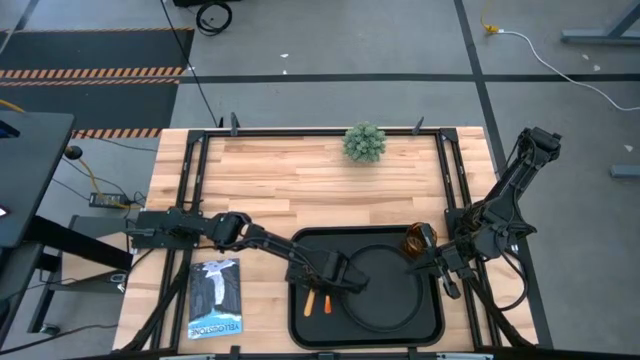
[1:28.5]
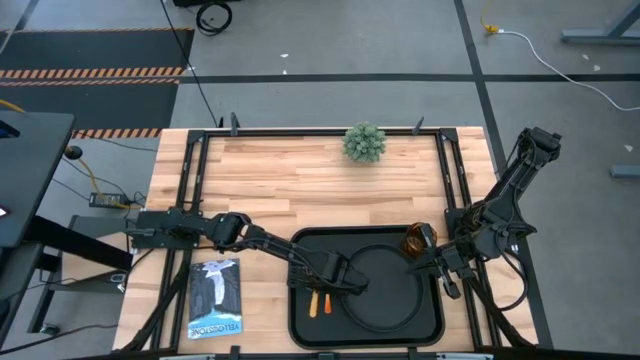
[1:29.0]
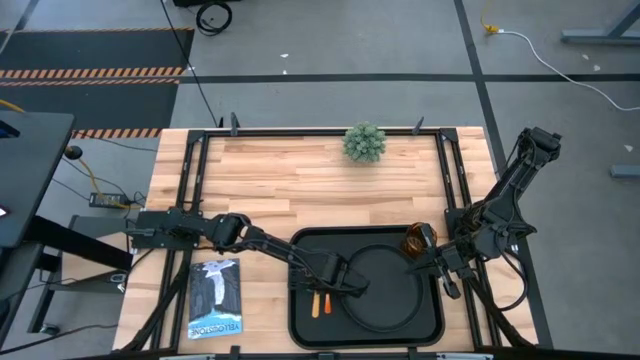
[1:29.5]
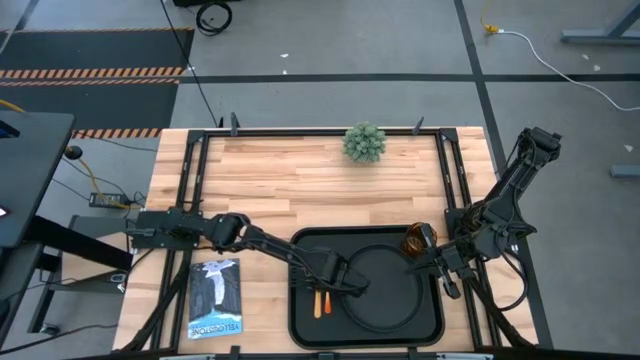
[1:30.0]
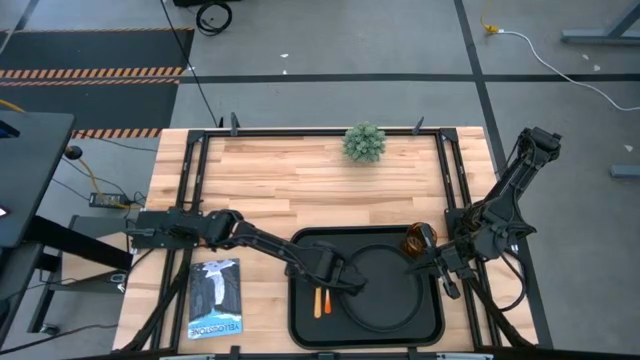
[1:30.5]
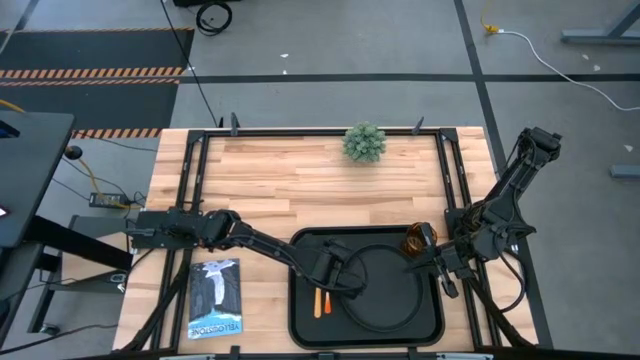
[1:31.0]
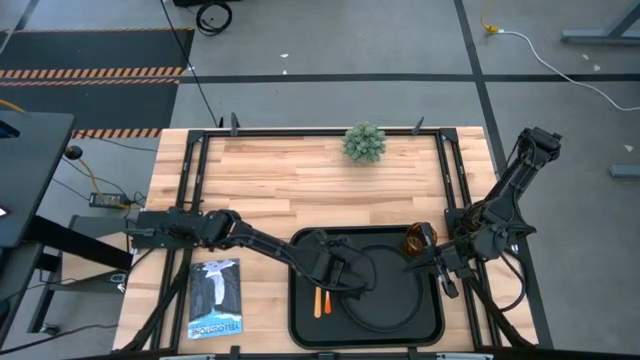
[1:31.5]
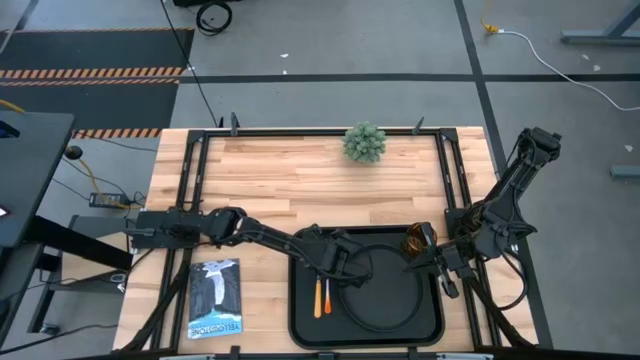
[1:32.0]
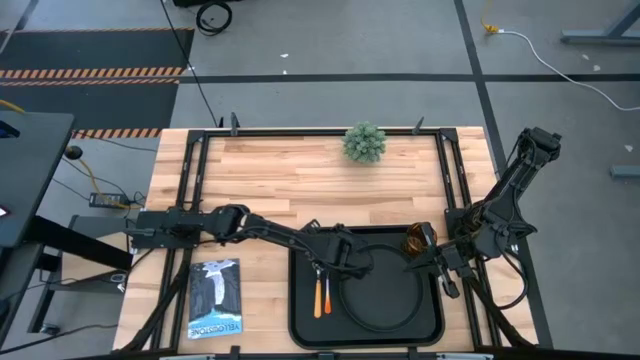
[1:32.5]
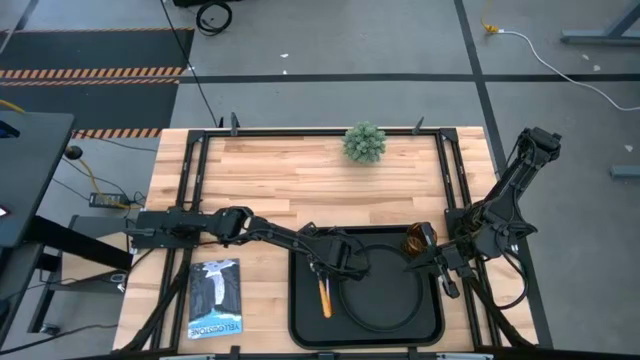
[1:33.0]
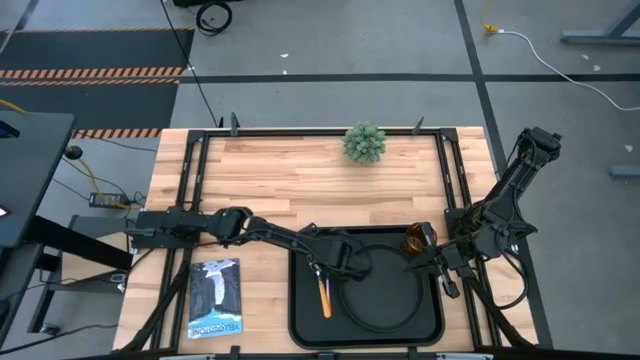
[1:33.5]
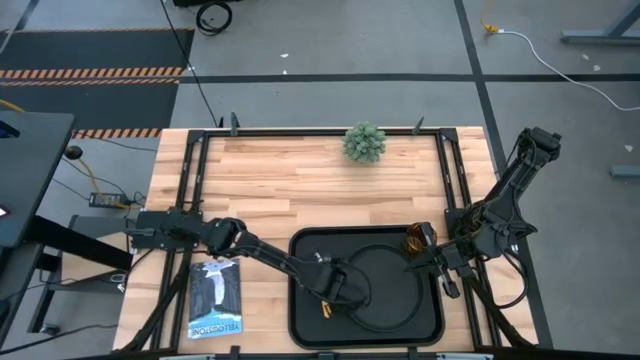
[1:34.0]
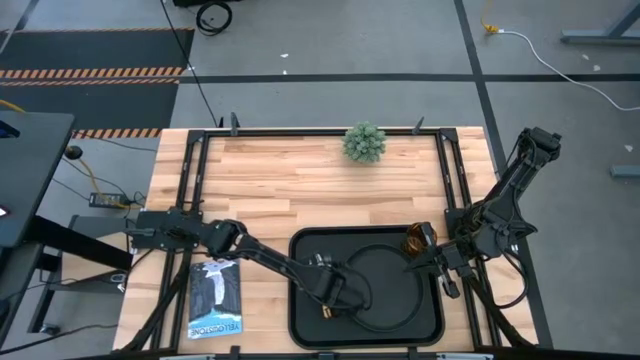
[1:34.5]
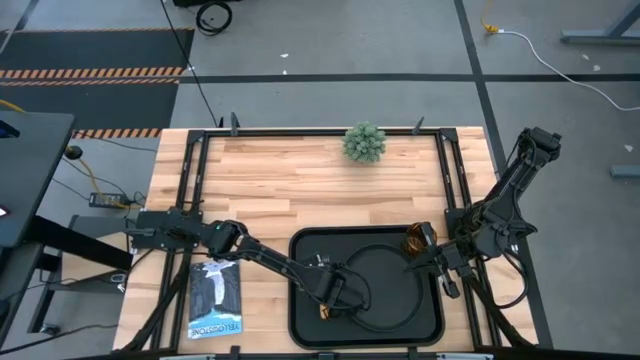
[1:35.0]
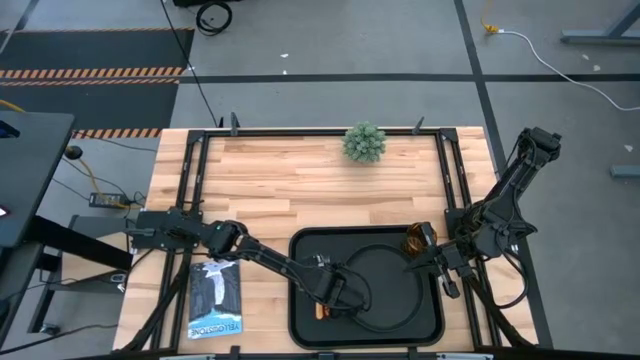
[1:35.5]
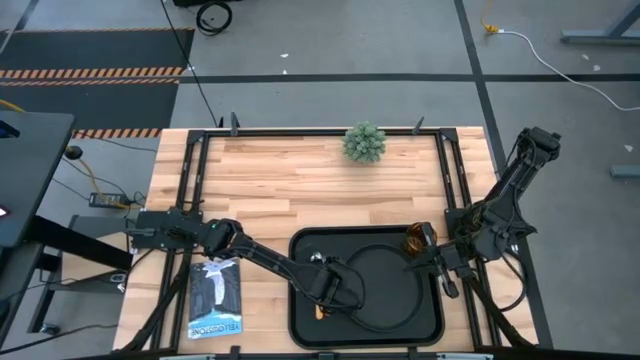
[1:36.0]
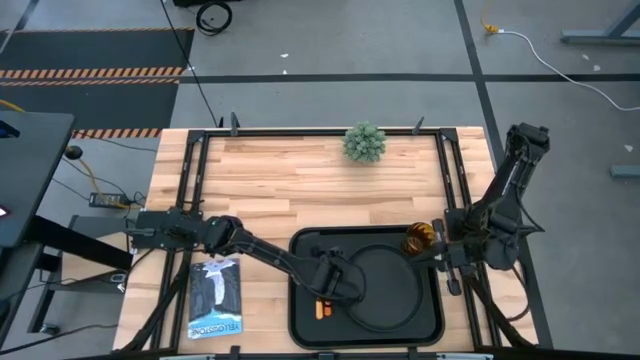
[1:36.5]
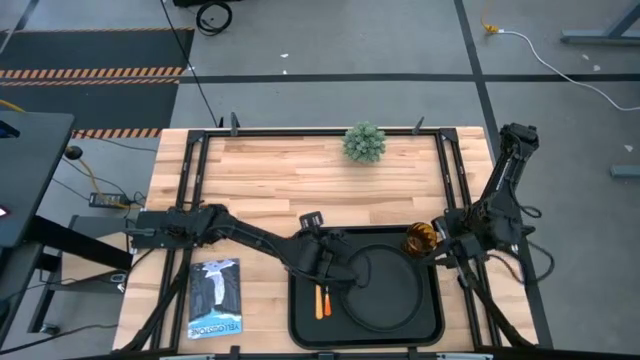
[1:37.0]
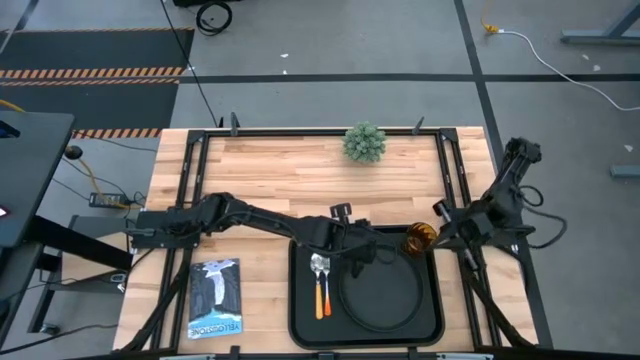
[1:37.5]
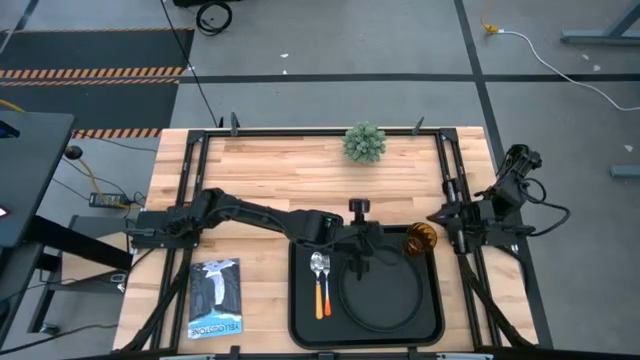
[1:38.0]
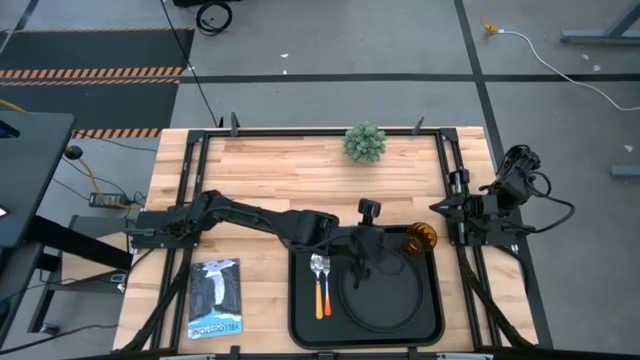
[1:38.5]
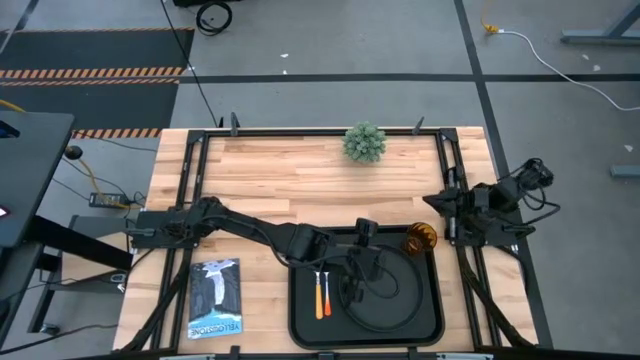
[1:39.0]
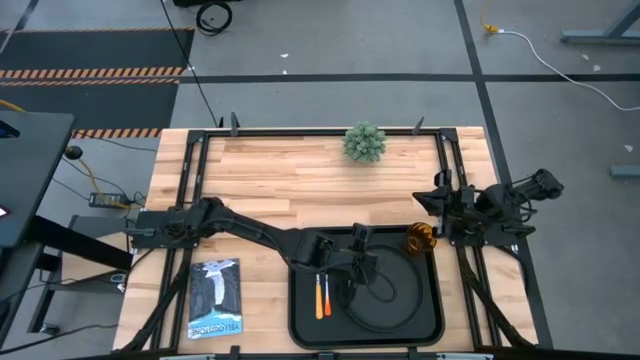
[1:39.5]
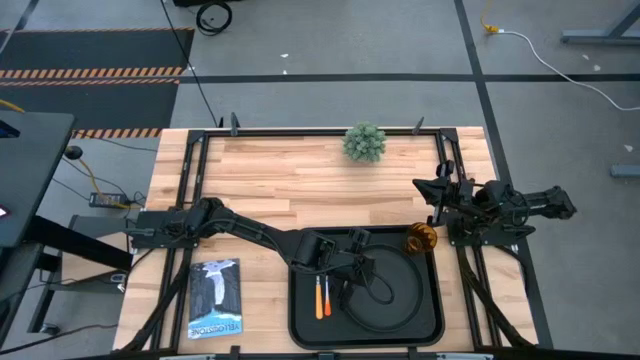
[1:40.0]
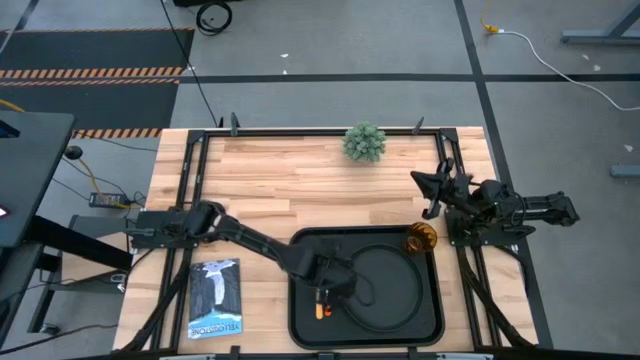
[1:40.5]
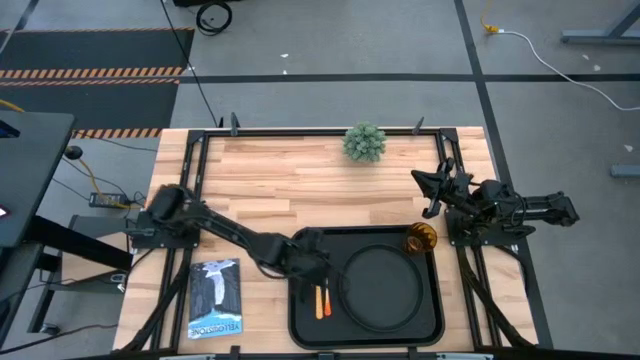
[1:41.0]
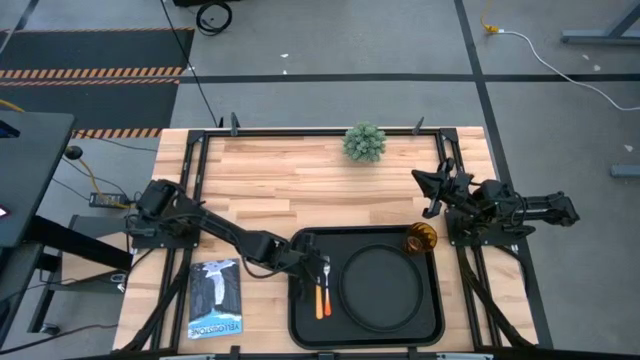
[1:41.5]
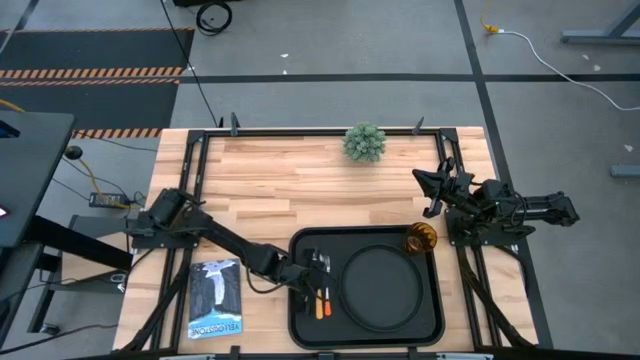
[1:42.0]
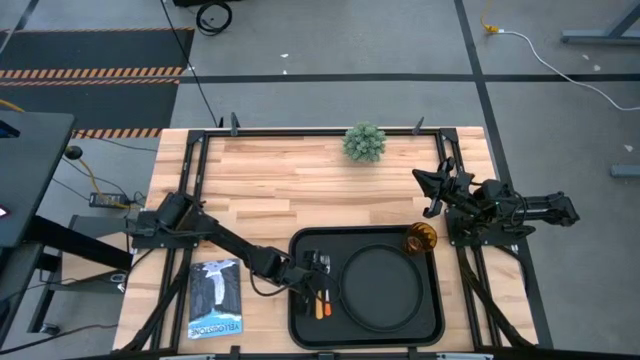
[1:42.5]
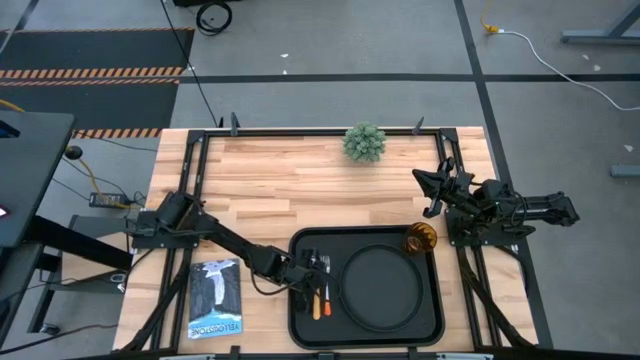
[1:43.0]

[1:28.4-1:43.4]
Task: Pick and place plate/cup/fork/spoon on tray
Put the yellow spoon to the left orange fork on the black tray

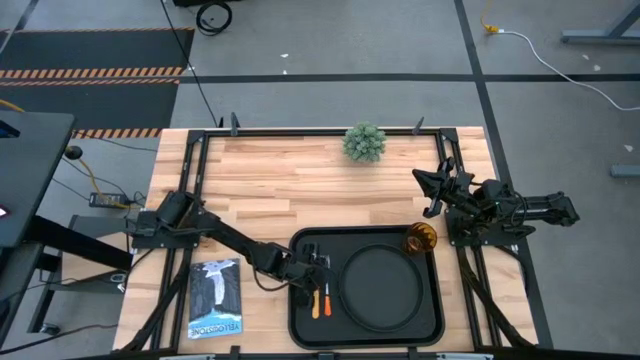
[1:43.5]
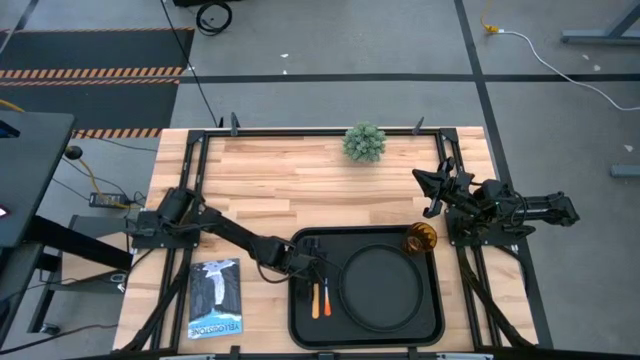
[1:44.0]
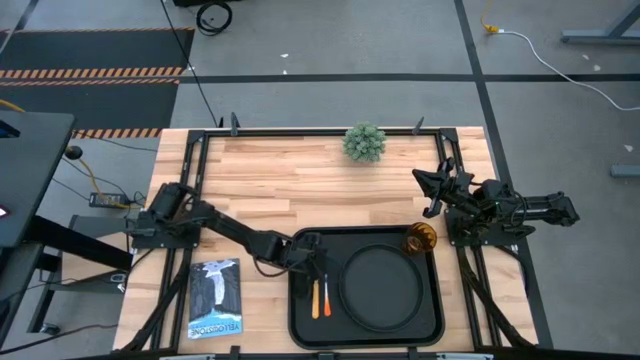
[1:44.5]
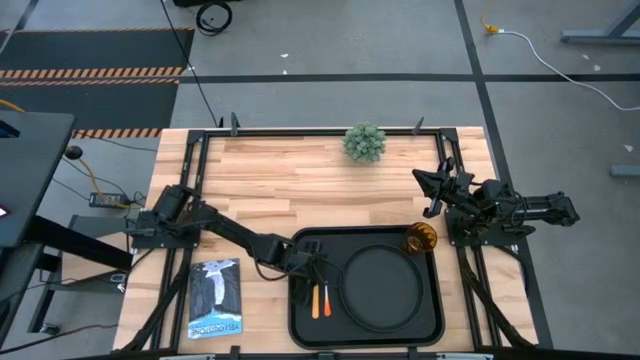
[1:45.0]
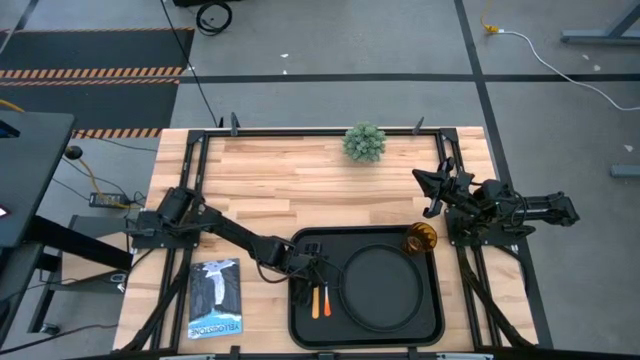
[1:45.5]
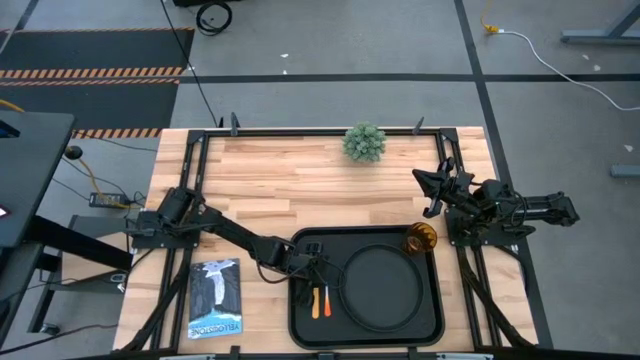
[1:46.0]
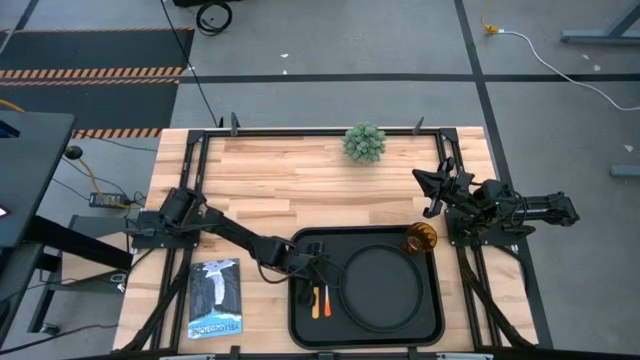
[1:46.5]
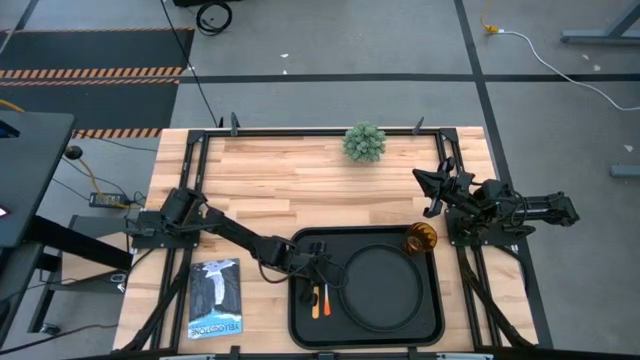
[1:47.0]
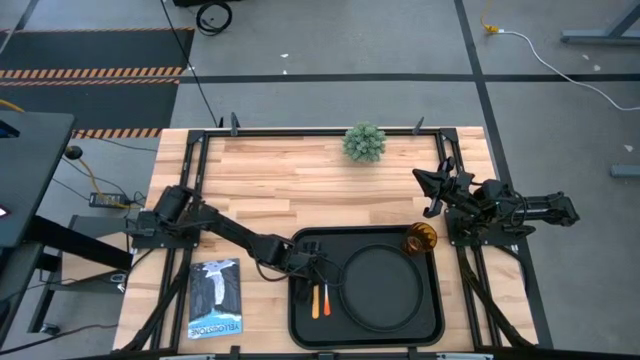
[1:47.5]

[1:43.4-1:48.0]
Adjust the utensils on the black tray
